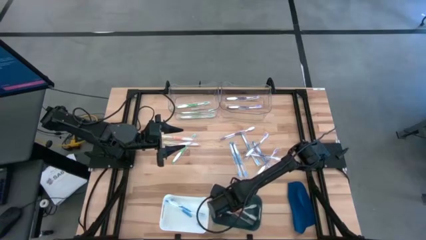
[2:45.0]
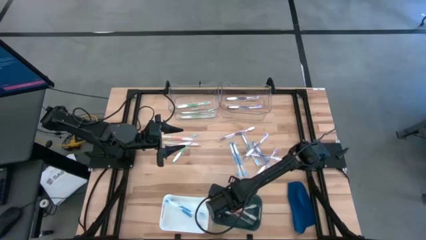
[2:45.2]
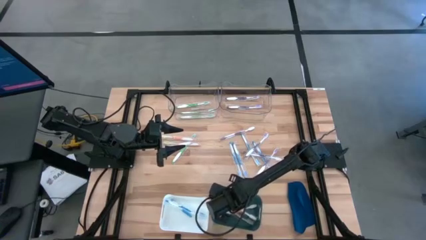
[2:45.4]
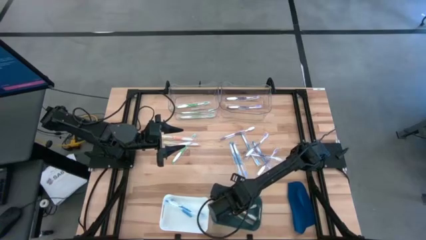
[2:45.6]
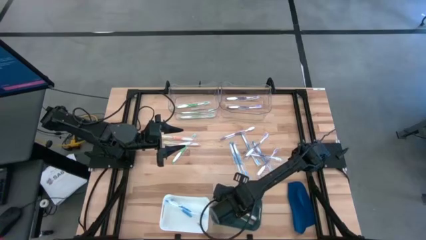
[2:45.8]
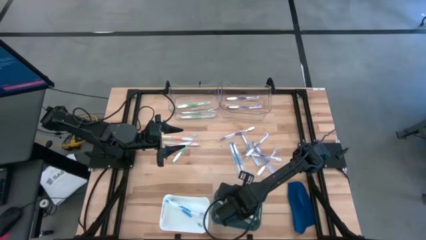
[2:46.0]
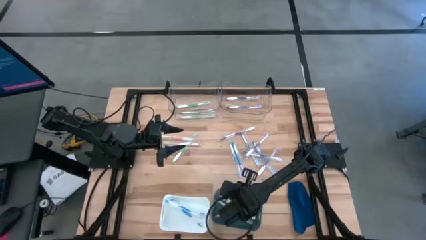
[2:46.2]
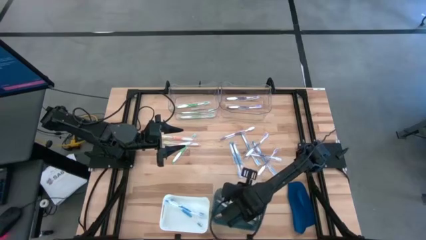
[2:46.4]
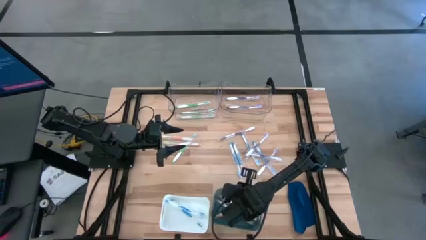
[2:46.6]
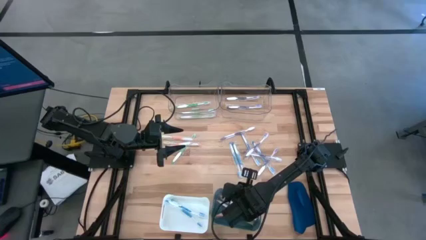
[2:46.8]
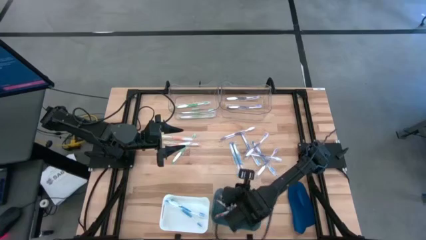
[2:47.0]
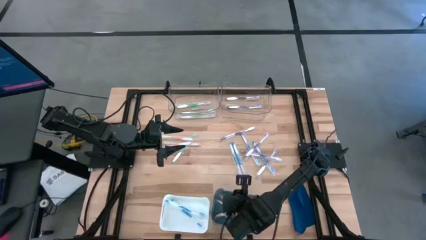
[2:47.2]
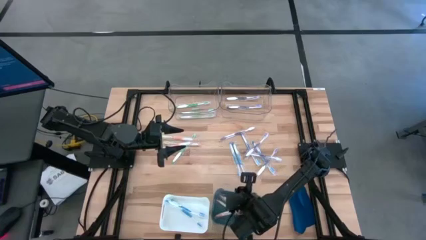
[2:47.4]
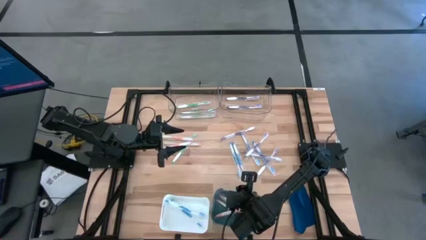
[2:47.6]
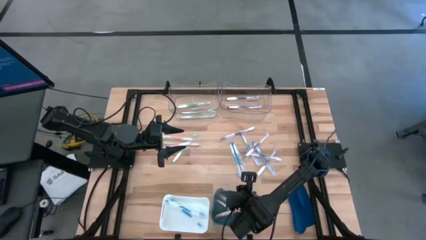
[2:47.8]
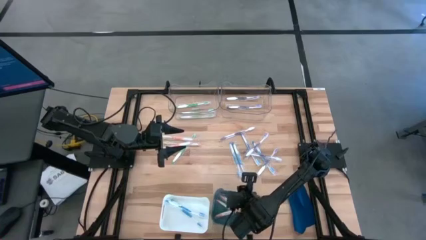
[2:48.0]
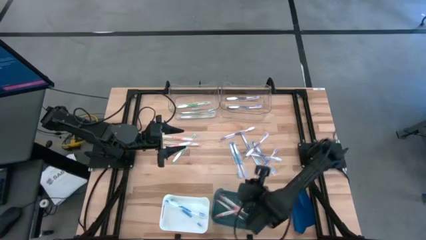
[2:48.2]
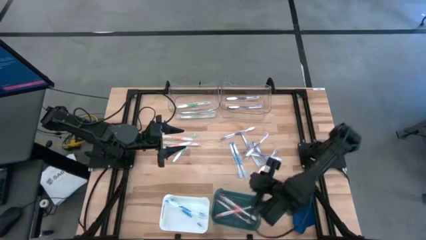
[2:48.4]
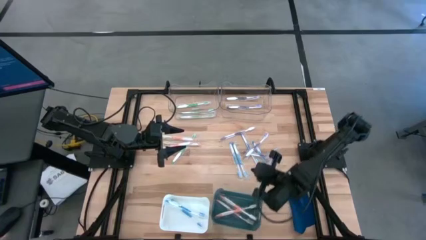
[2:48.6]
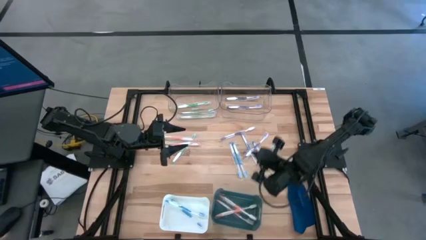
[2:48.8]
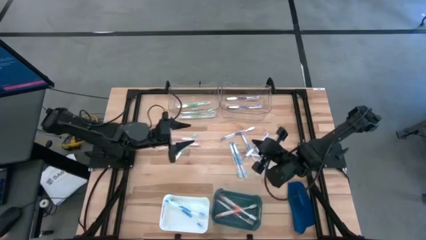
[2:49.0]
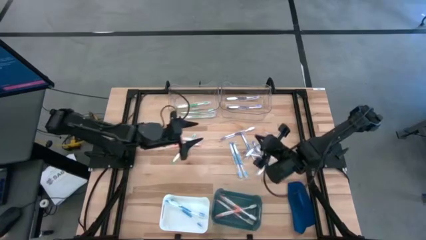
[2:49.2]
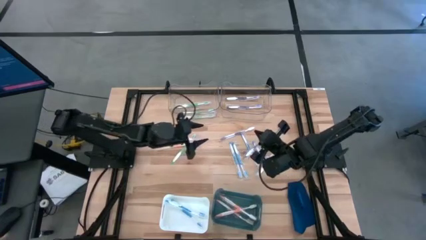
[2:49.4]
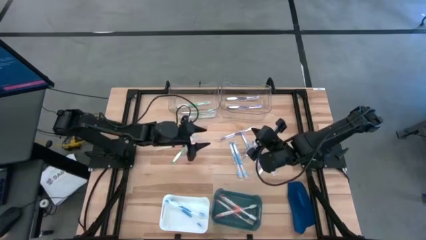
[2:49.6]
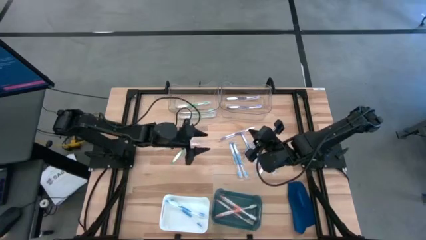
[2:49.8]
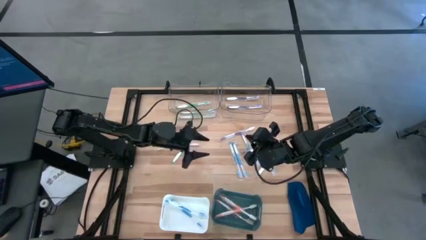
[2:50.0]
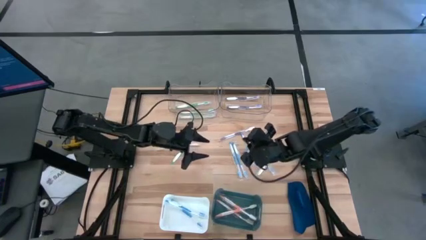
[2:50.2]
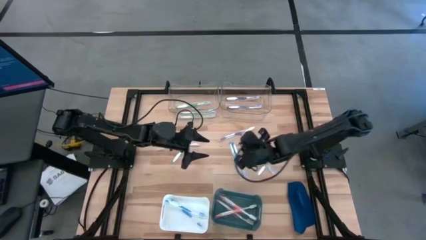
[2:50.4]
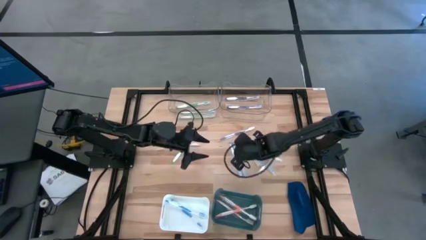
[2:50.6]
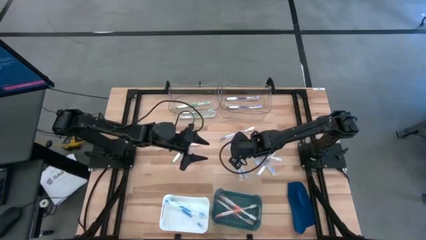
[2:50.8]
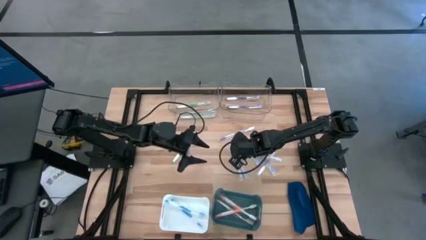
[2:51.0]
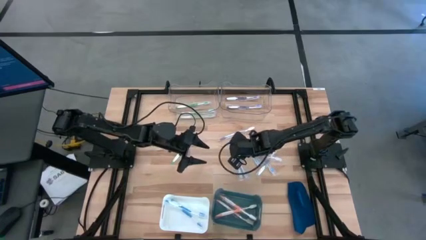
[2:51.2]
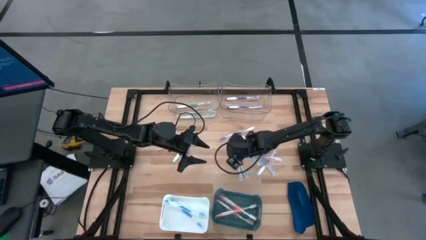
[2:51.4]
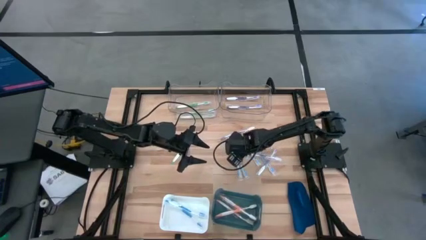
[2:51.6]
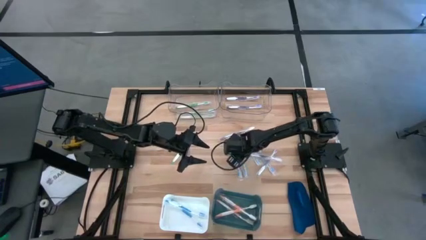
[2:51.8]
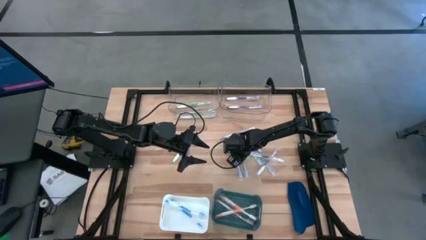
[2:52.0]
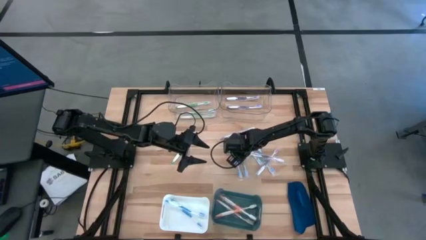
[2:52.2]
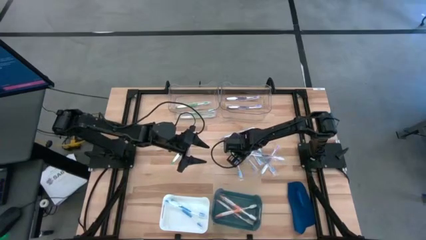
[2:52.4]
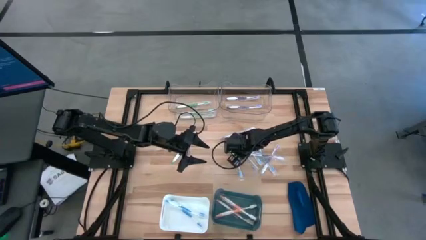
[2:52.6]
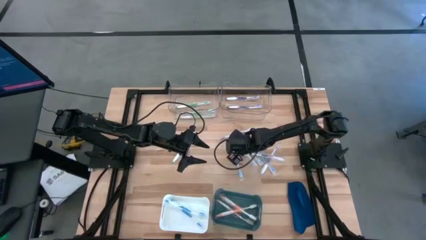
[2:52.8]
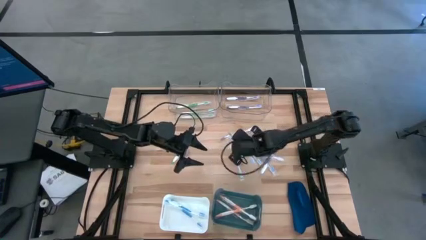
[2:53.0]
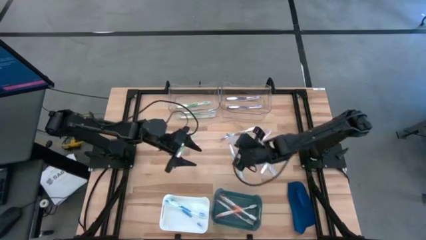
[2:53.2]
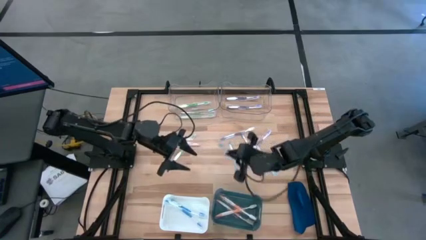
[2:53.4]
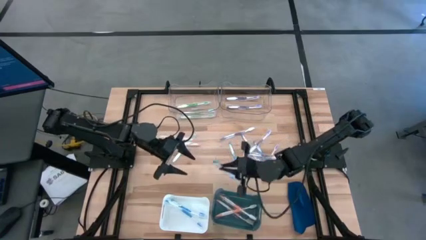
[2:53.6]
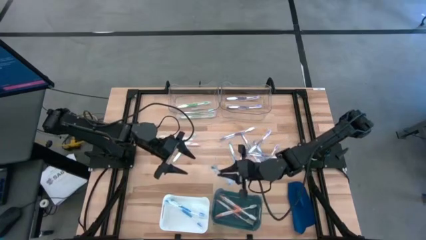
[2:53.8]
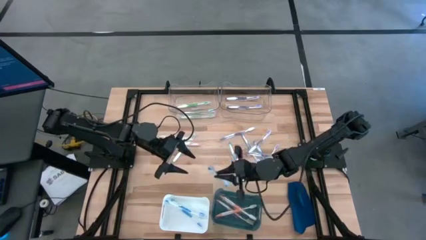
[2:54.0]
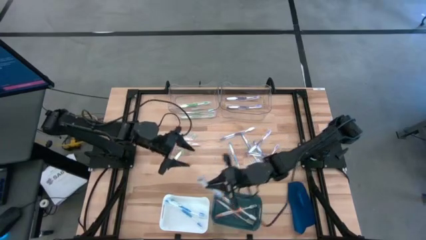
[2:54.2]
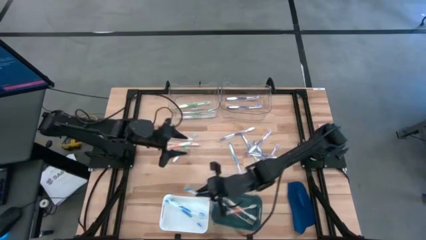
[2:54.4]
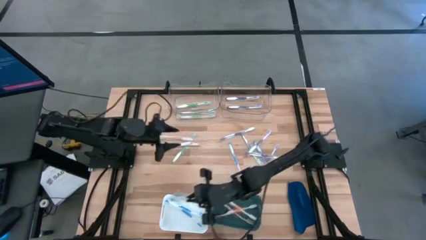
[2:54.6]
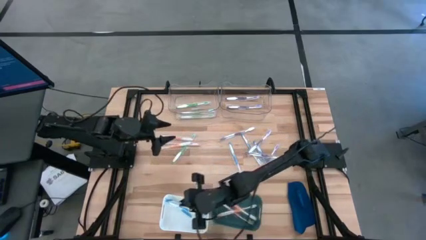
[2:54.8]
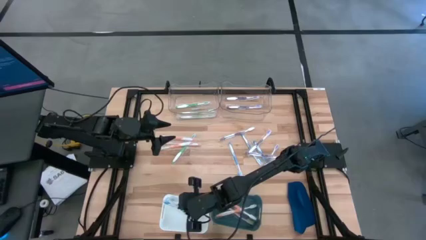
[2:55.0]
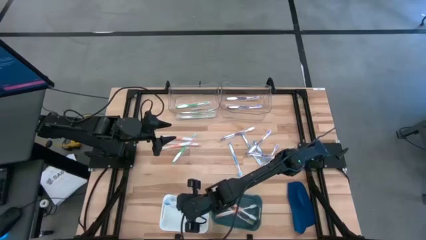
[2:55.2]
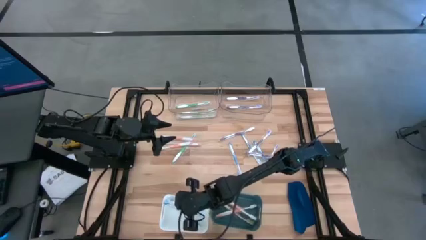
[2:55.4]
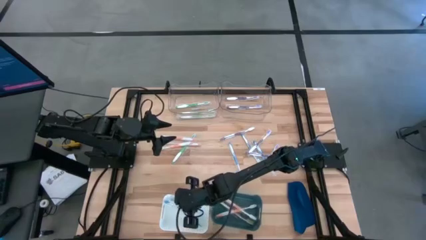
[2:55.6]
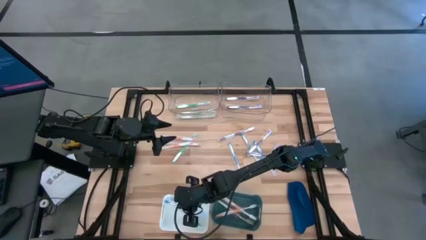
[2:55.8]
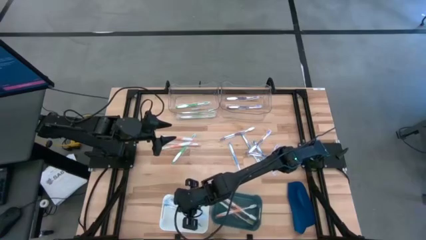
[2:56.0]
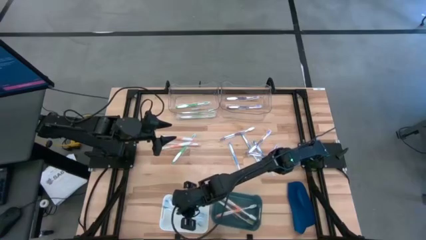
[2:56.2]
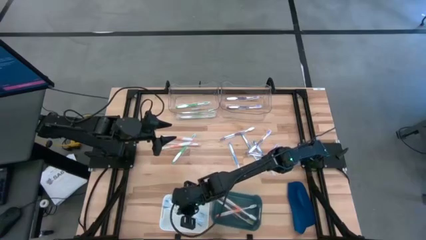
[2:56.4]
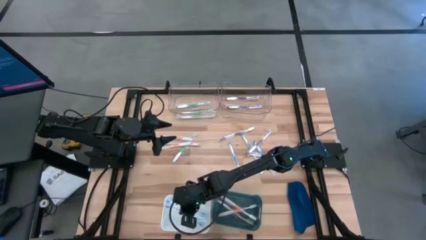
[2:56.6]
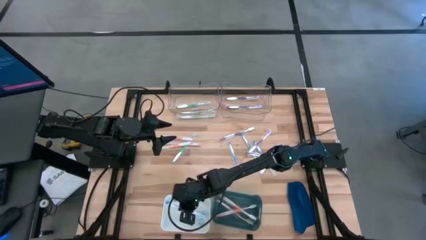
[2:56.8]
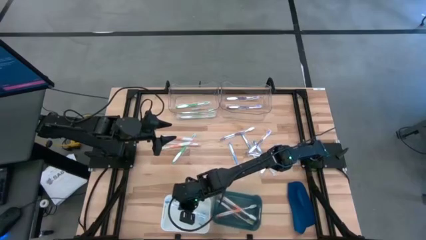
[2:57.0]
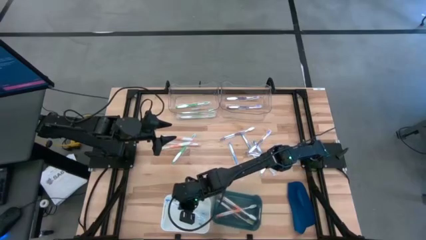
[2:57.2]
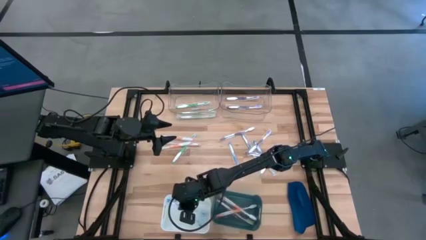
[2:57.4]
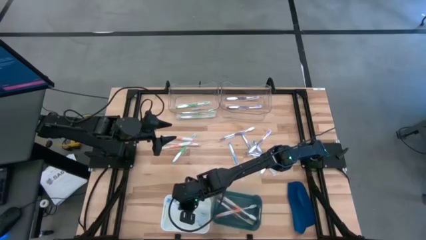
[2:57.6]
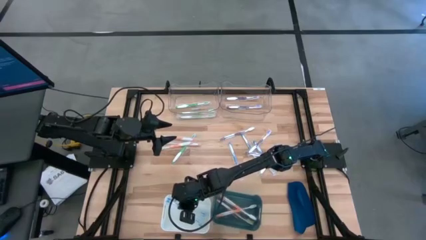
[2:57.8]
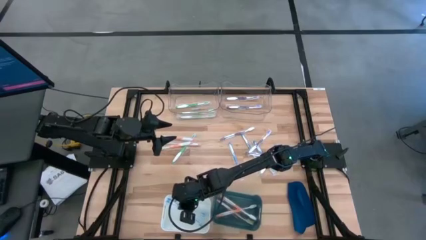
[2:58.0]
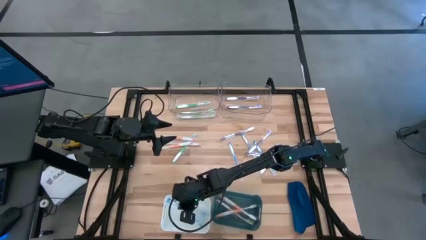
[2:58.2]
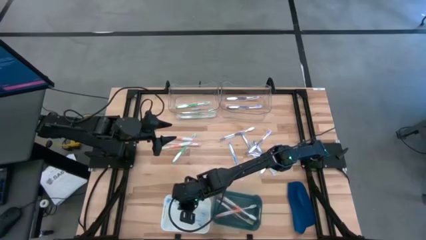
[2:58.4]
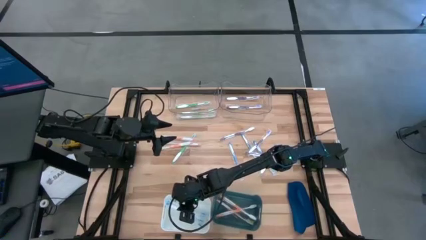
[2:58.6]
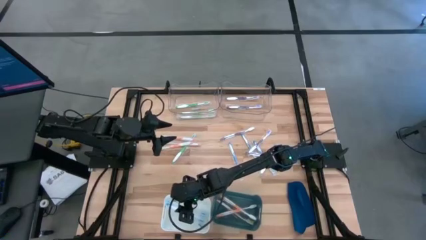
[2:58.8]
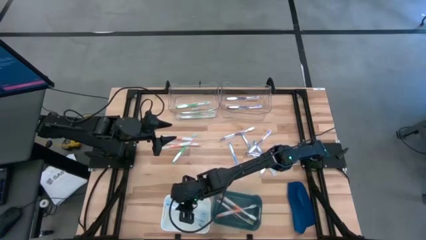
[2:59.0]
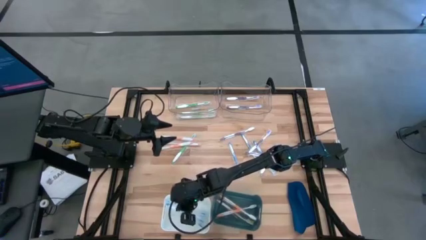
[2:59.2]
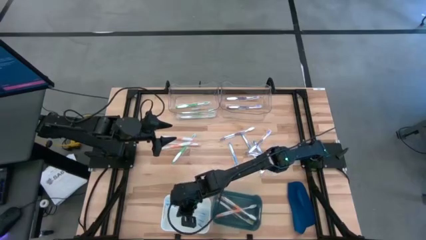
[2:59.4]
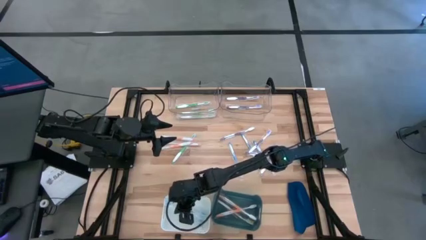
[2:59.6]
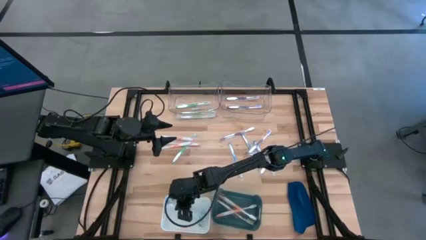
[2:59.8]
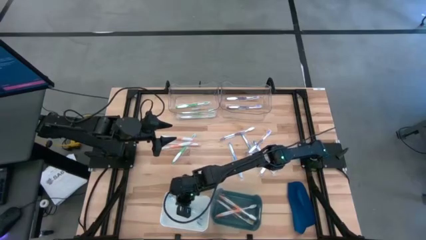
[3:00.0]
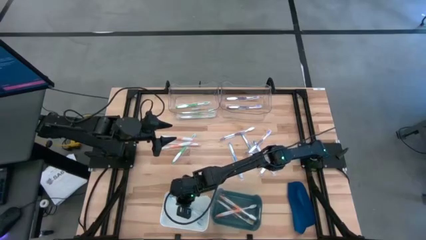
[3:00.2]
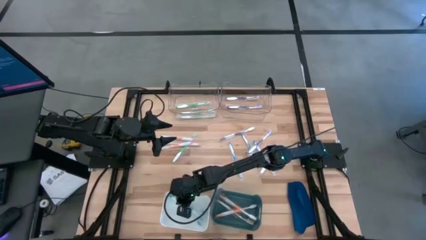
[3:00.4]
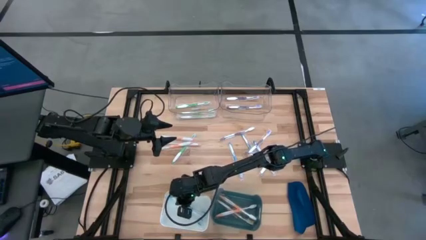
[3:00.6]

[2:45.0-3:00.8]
Task: Pick & Place Toothbrushes
Put the blue toothbrush into the white bin

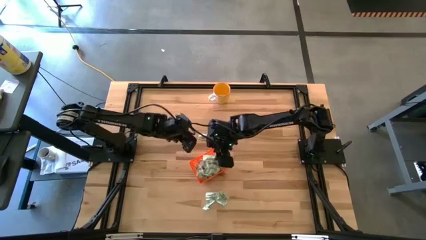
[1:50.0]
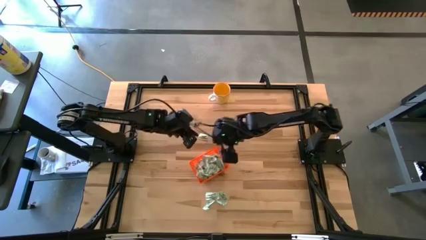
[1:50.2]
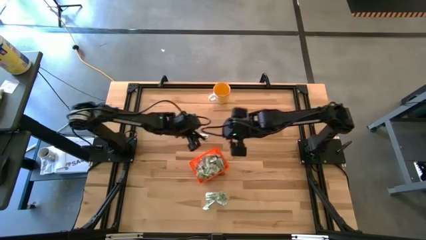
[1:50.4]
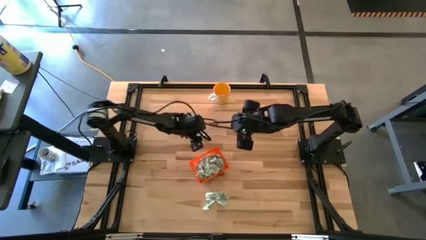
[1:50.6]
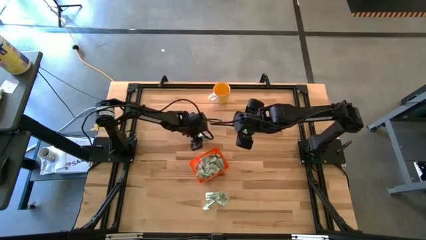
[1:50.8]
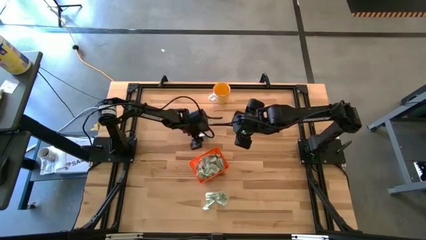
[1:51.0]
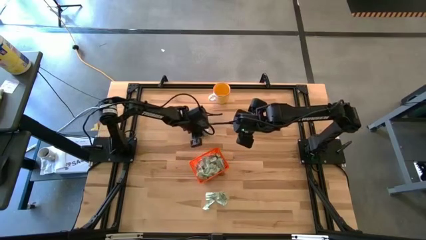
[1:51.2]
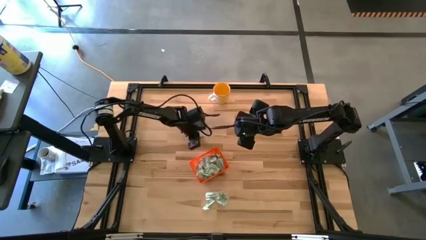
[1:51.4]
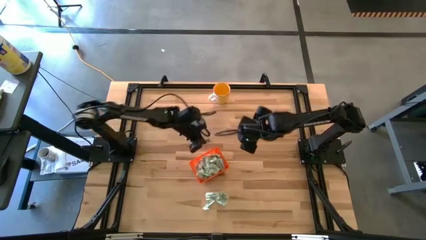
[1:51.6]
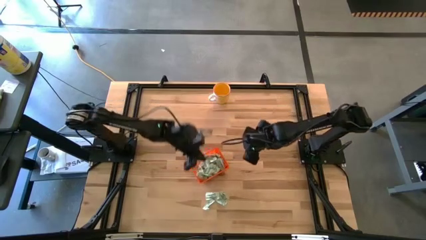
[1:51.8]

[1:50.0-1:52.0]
Task: Pick and place Stevia / Truvia into bins
Put the stevia packet into the bin
